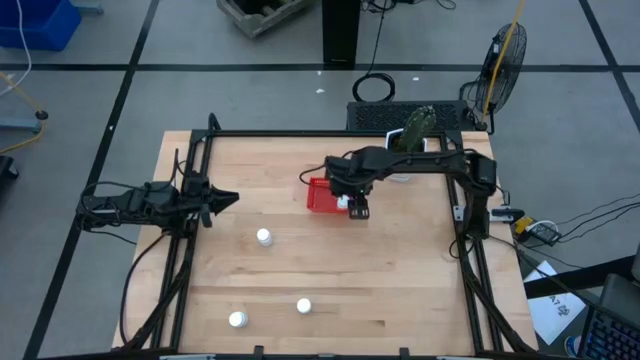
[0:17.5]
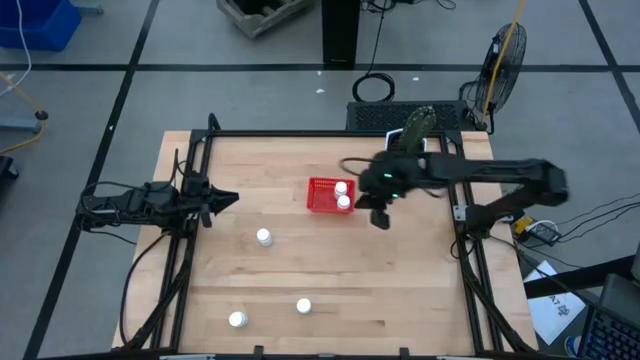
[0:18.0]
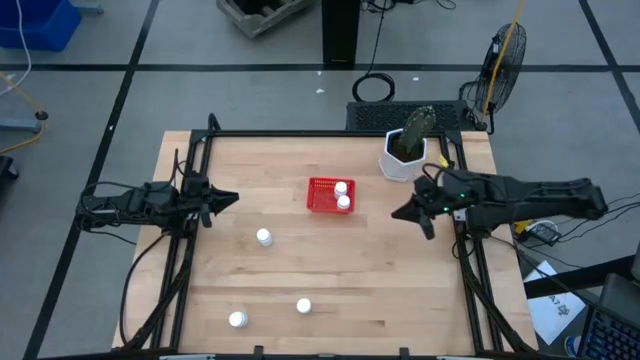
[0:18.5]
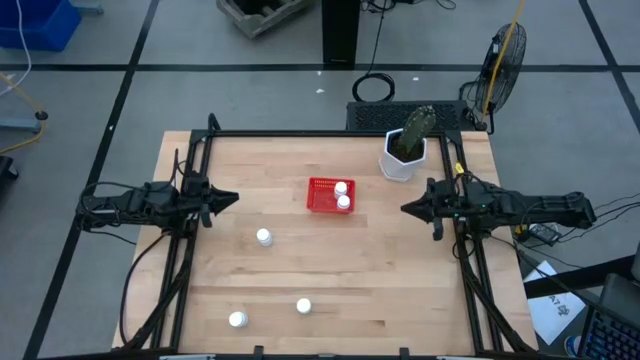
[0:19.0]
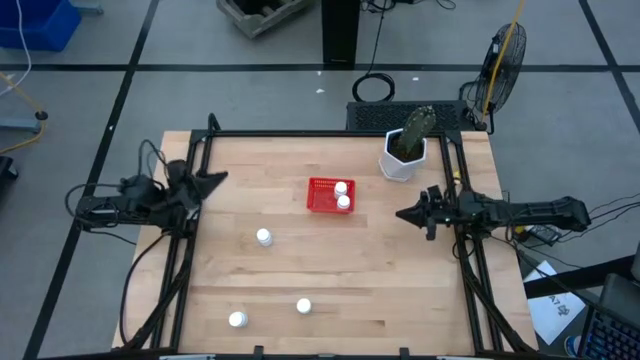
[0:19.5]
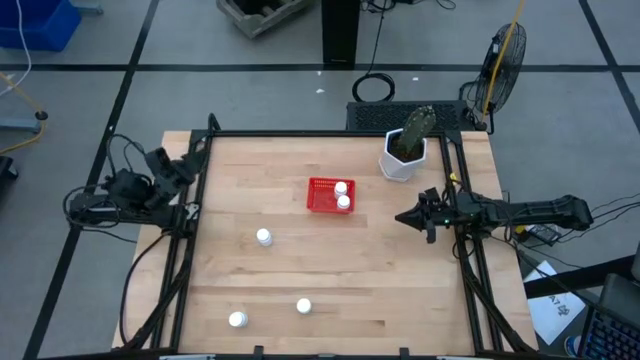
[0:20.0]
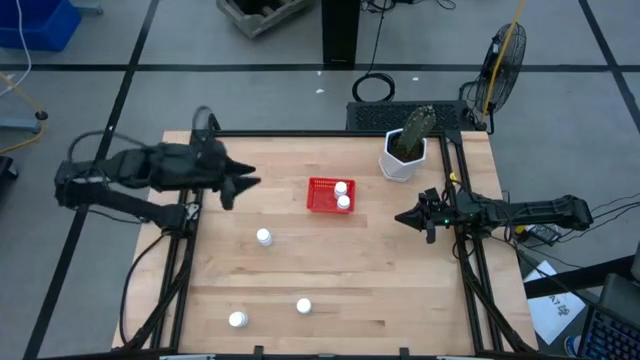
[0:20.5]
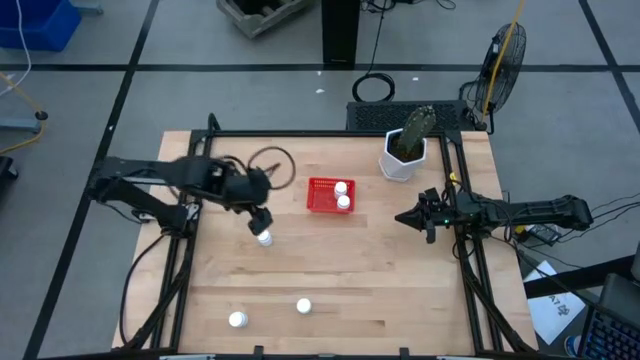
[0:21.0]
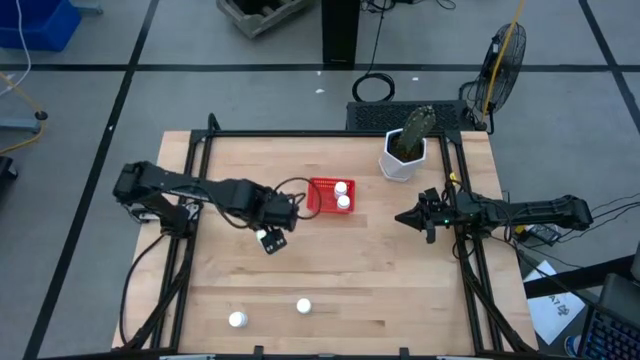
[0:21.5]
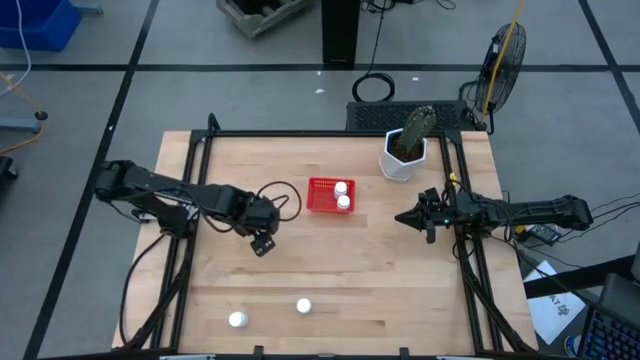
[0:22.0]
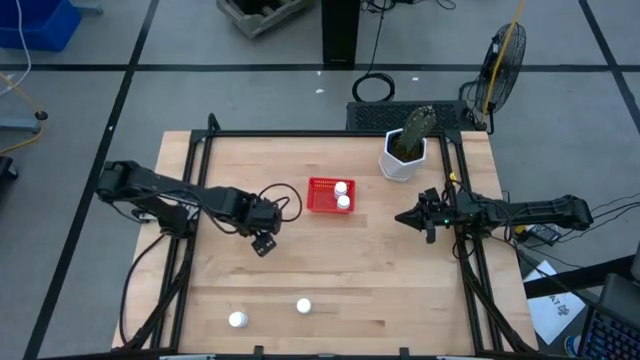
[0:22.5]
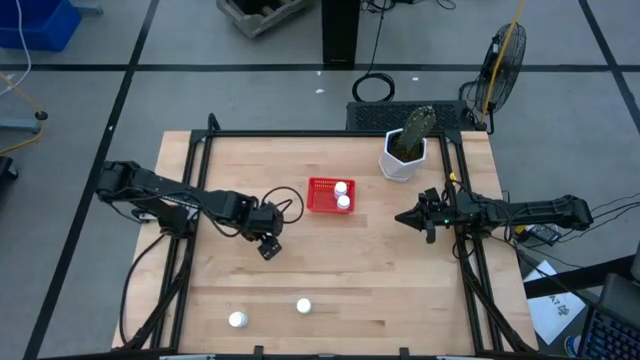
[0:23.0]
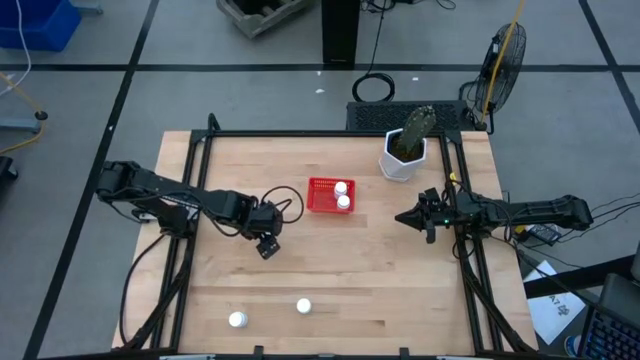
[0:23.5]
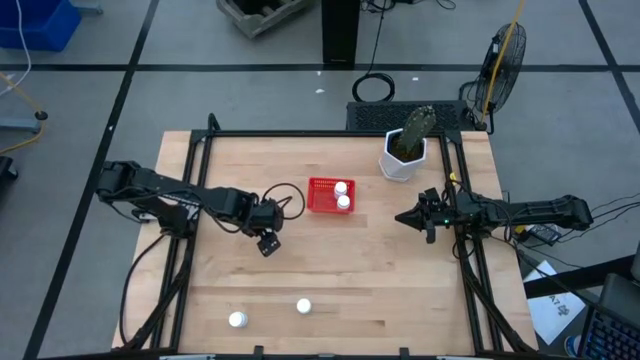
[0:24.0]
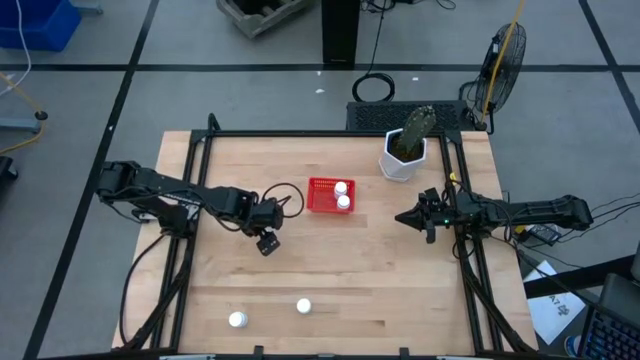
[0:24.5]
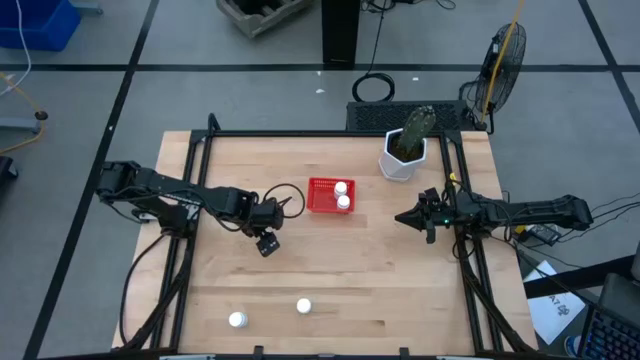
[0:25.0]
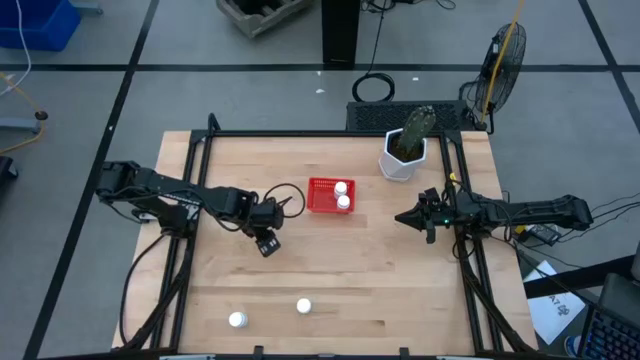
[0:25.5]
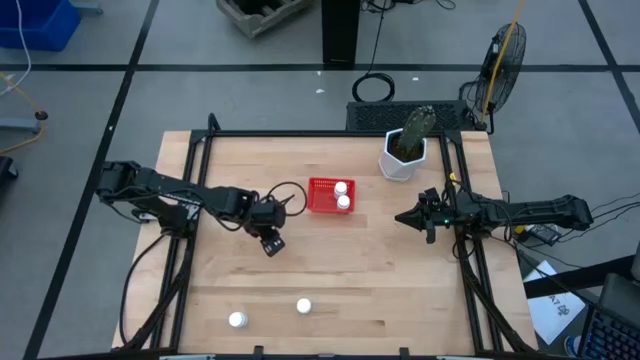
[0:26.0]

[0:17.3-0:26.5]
Task: Pick and place pill bottles into a basket
Put the white medicine bottle into the red basket

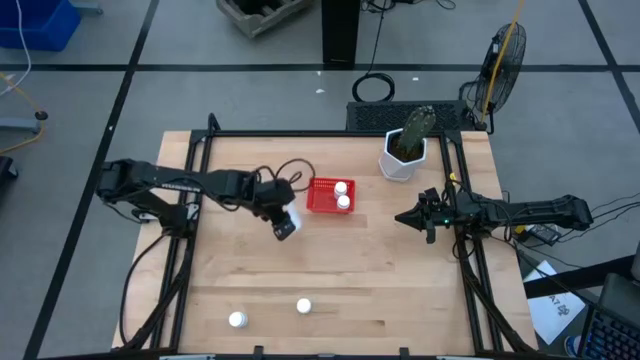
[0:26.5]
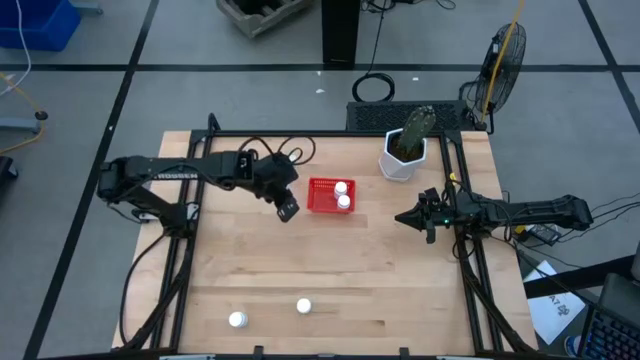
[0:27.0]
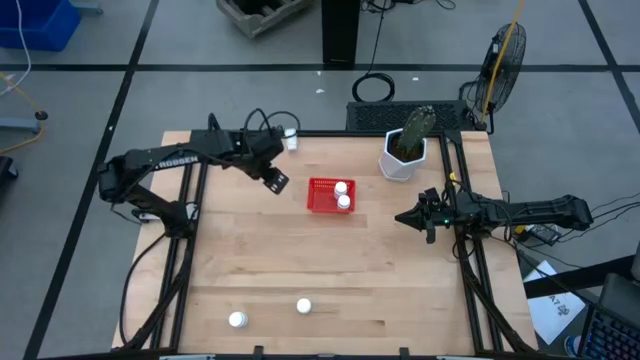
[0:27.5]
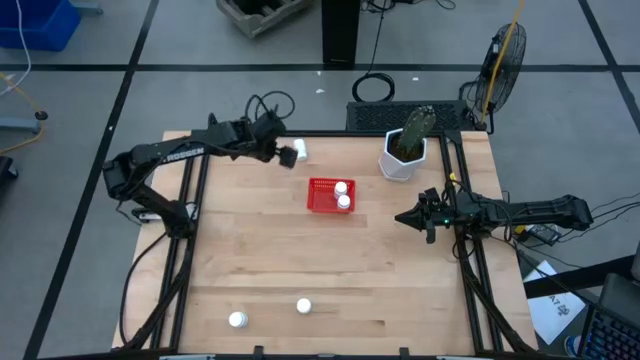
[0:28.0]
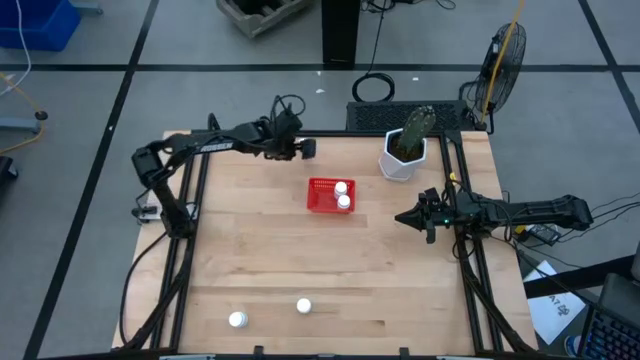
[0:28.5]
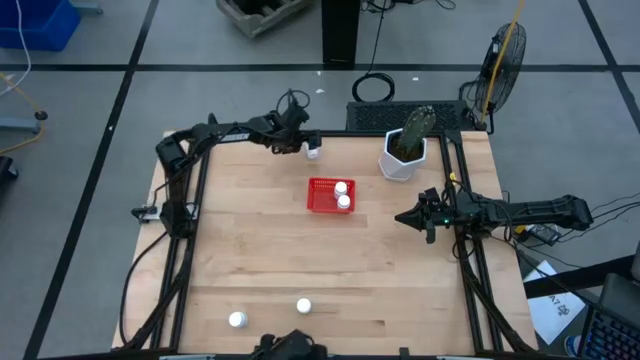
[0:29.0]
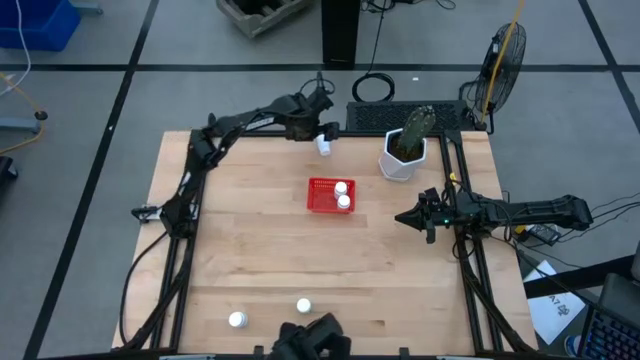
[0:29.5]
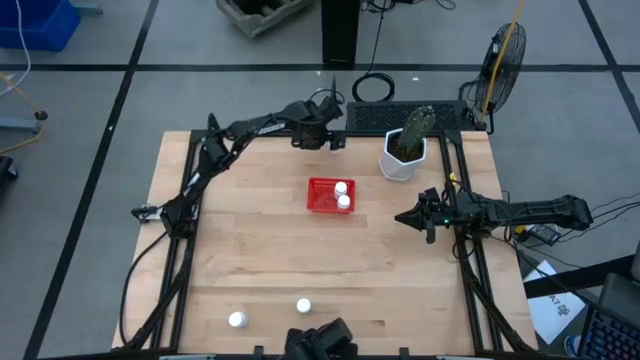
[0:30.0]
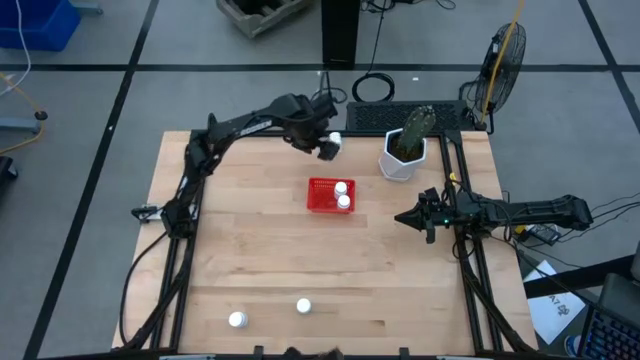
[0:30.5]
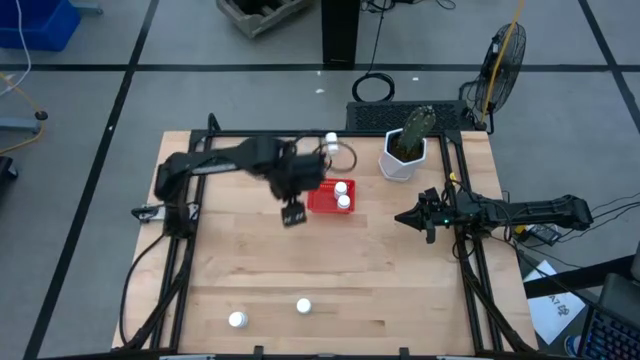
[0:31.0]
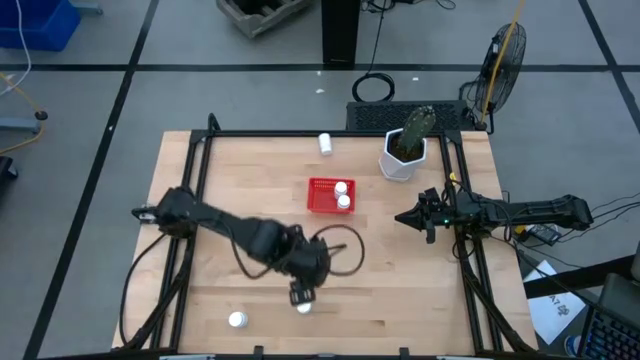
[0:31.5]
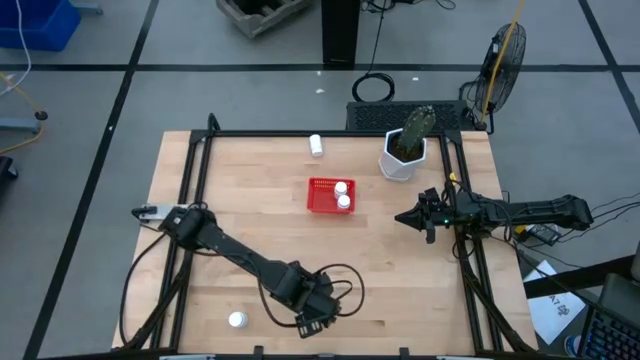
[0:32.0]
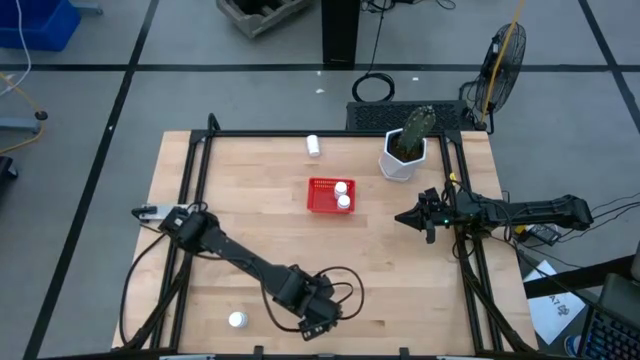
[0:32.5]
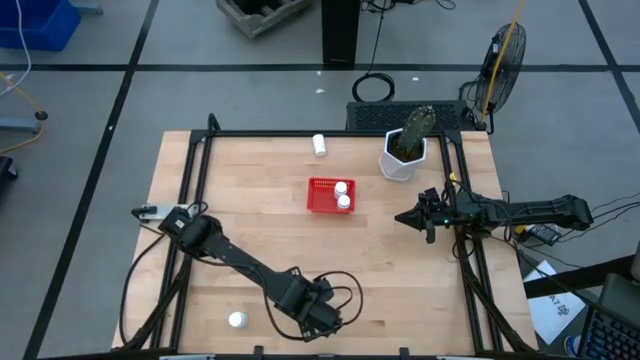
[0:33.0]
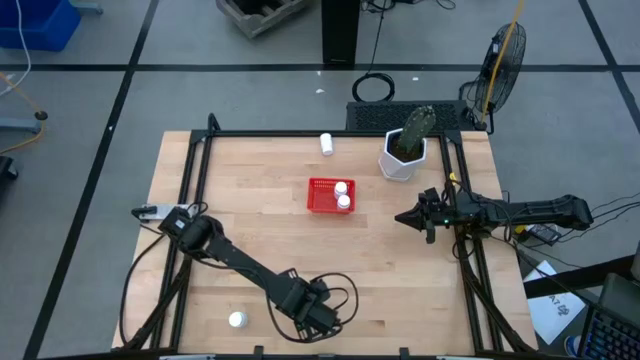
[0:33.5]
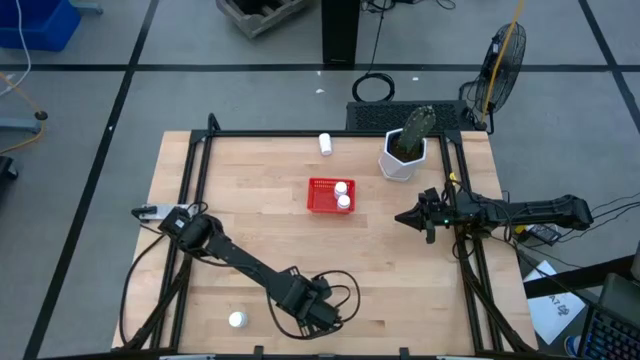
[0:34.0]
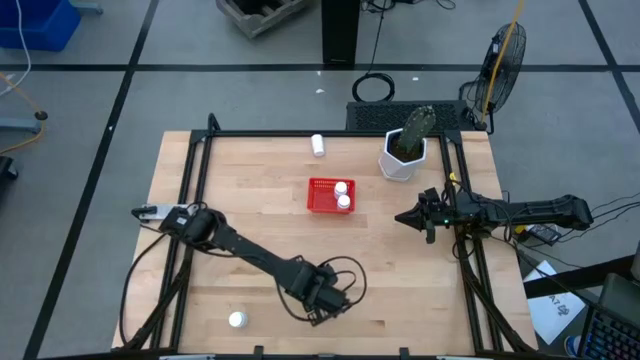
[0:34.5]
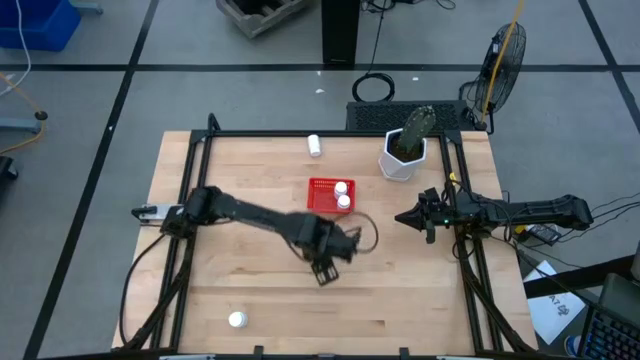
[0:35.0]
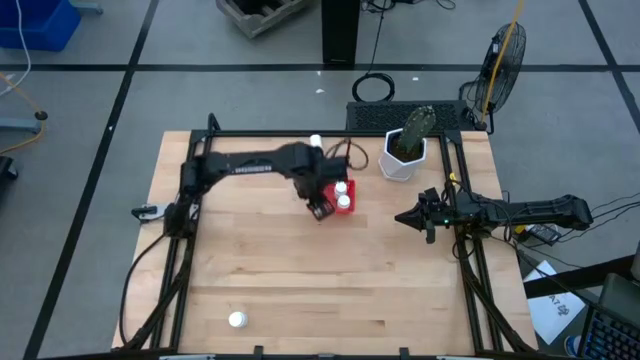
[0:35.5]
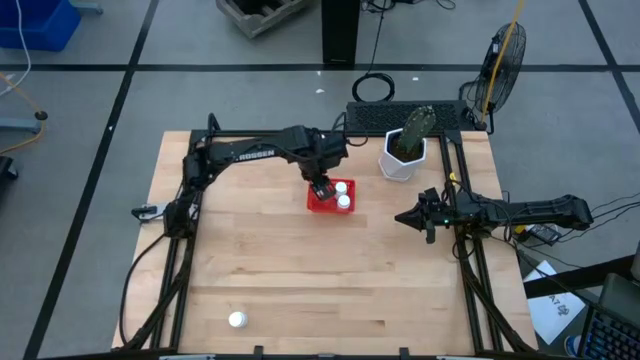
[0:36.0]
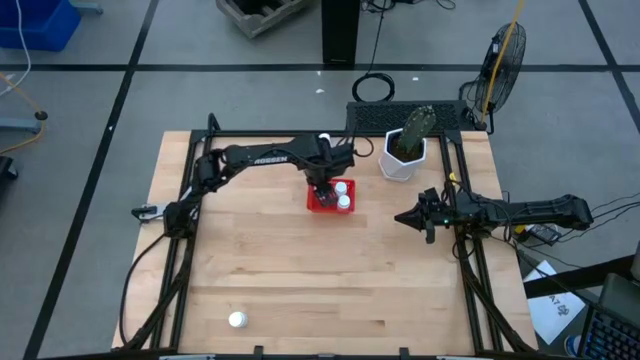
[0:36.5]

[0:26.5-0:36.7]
Put the white medicine bottle into the red basket

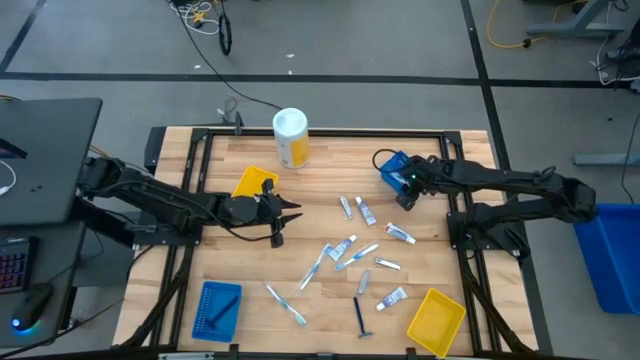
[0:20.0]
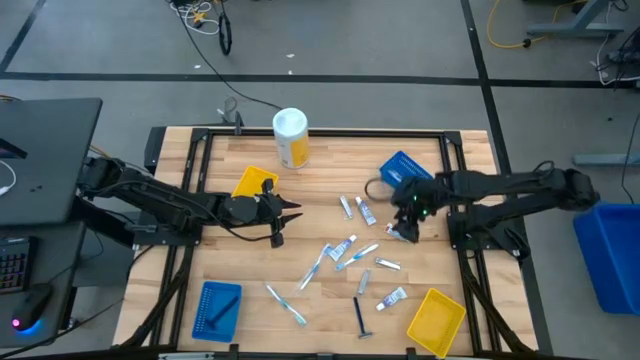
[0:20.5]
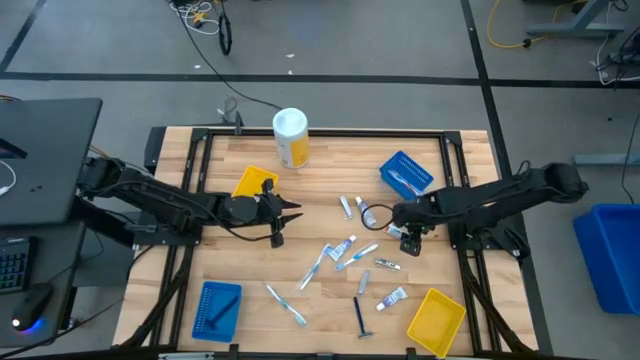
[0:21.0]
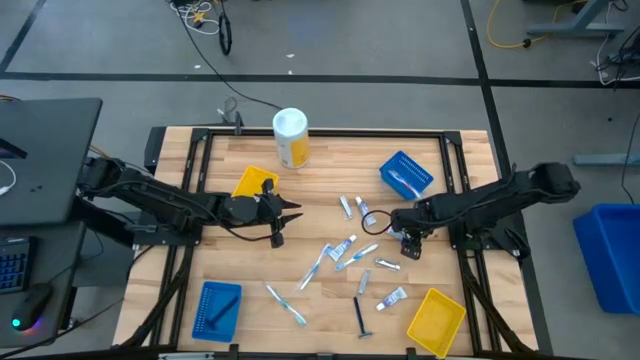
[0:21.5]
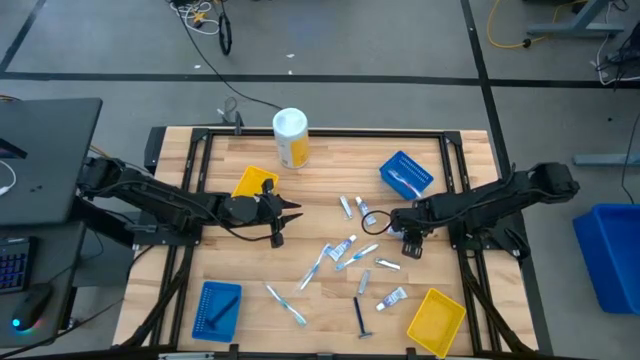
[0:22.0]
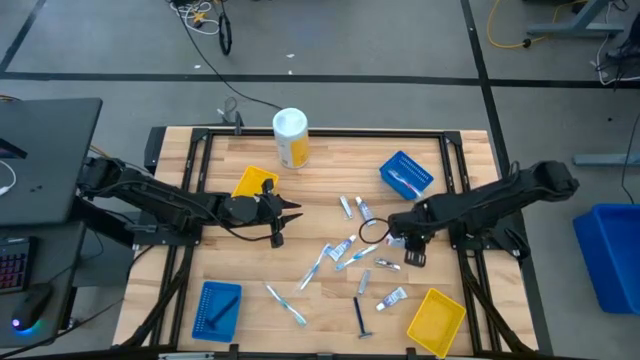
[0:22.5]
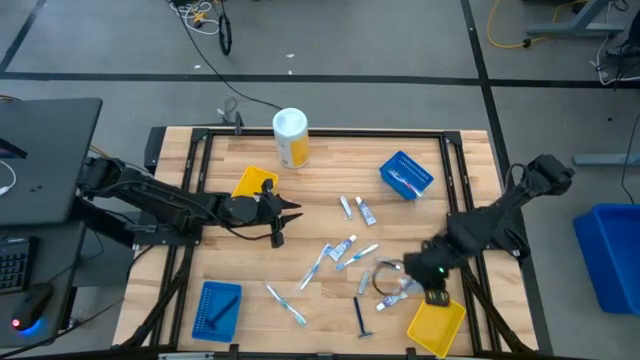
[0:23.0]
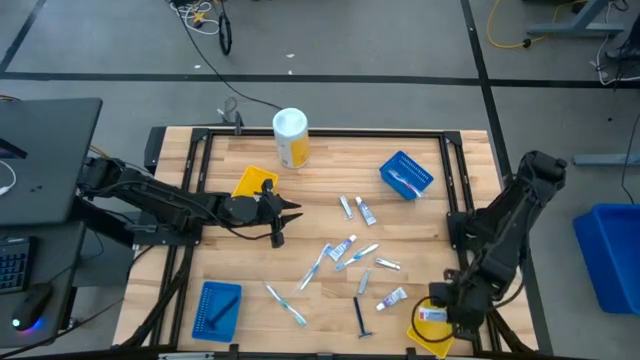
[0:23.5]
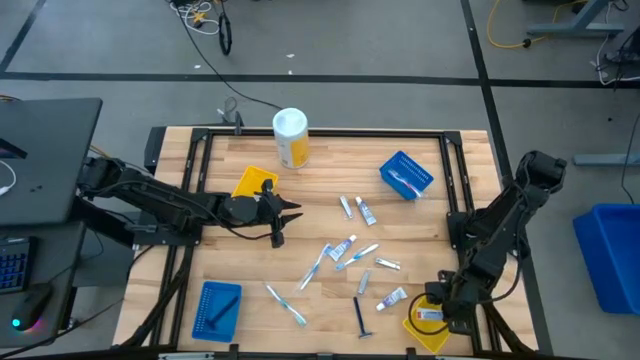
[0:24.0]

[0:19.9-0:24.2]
Task: Pick & Place Travel size toiletries
Put the white toothpaste into the bottom yellow bin
